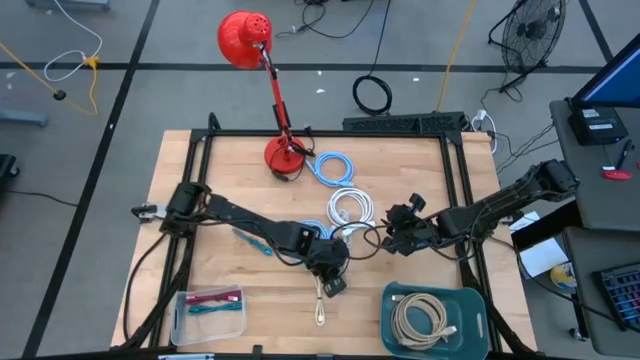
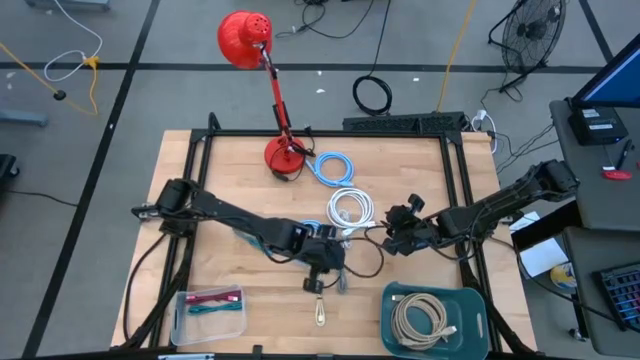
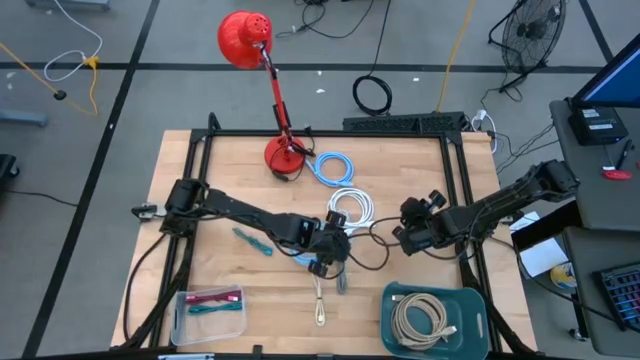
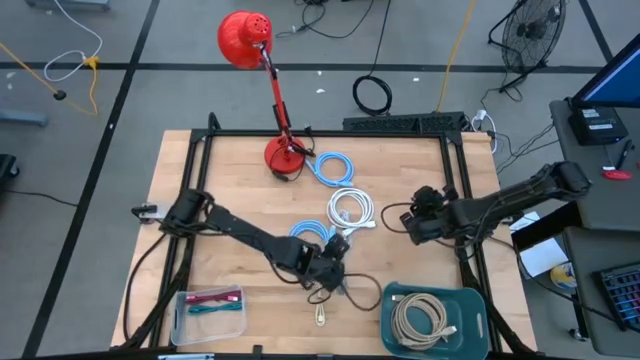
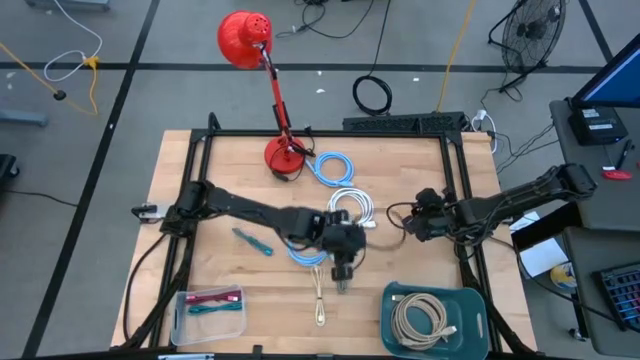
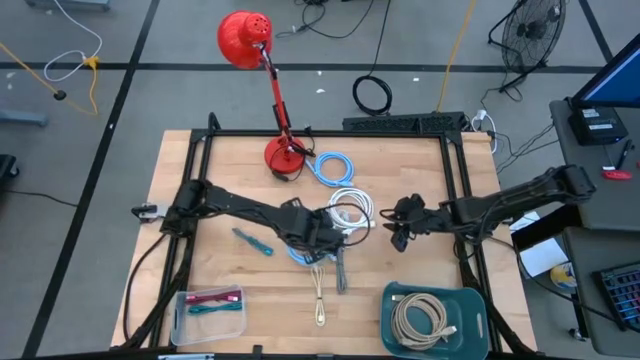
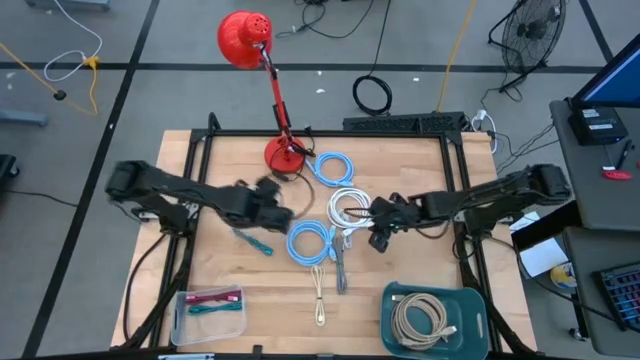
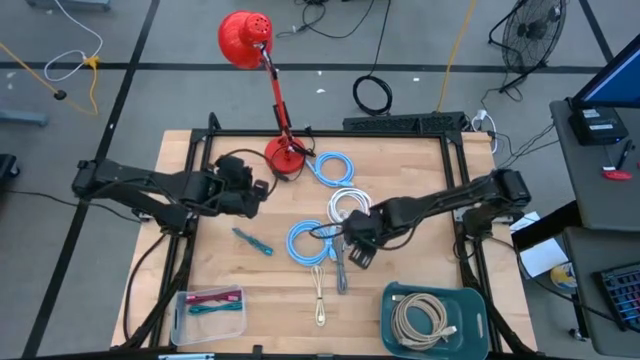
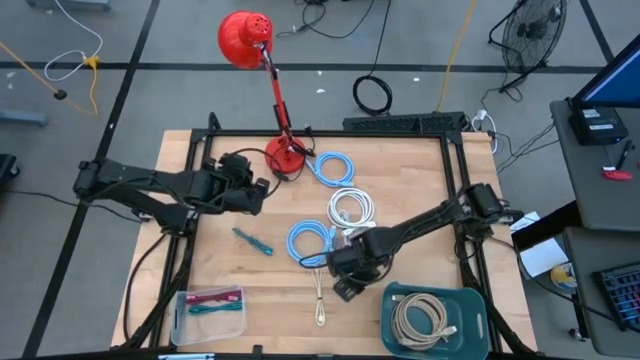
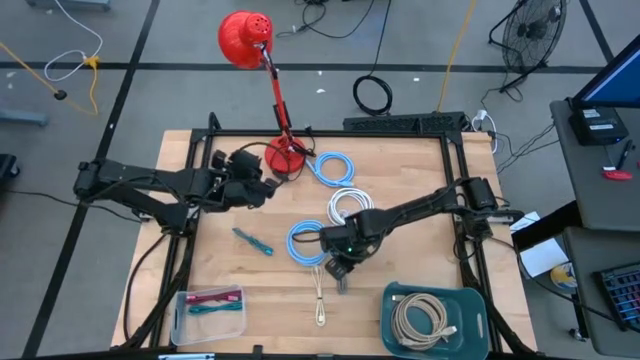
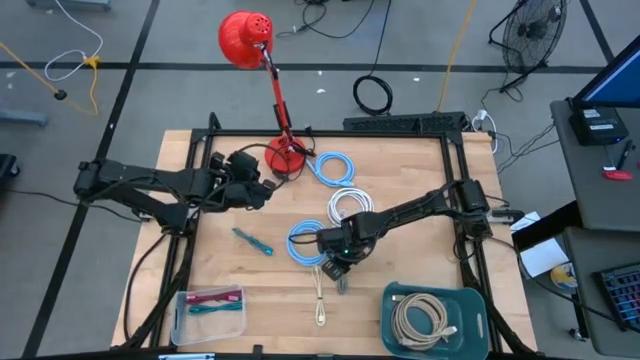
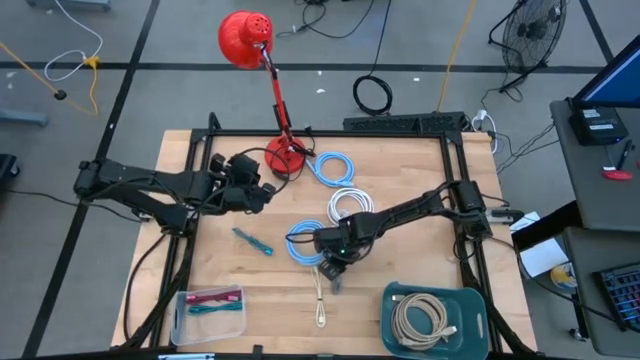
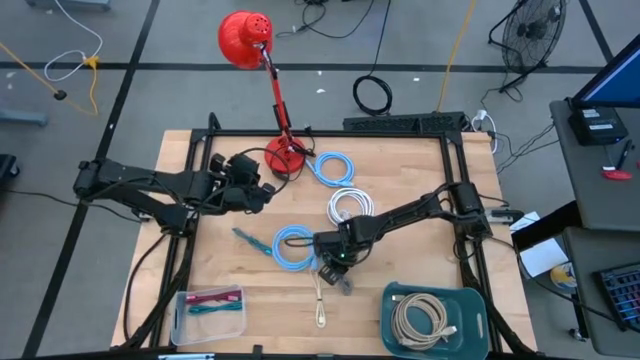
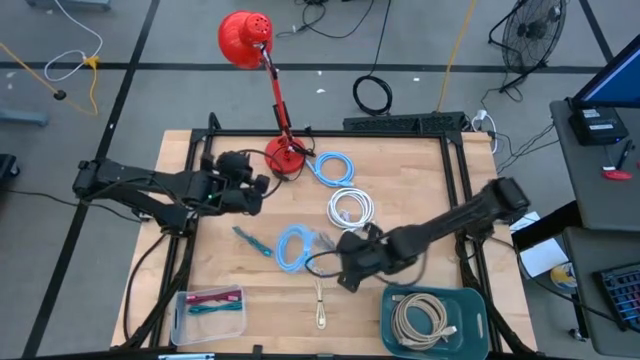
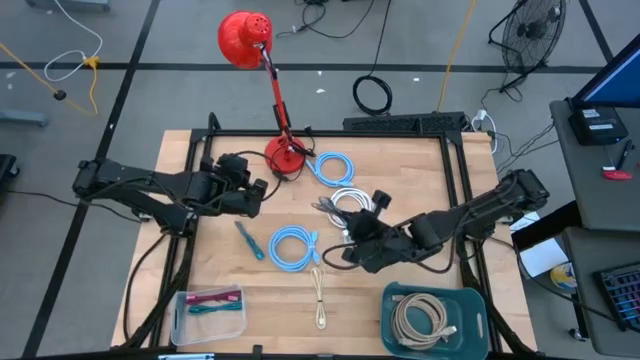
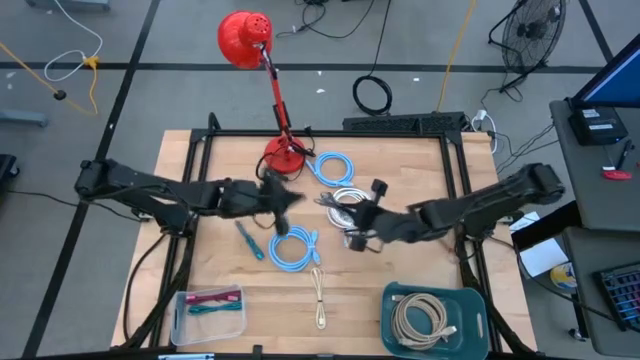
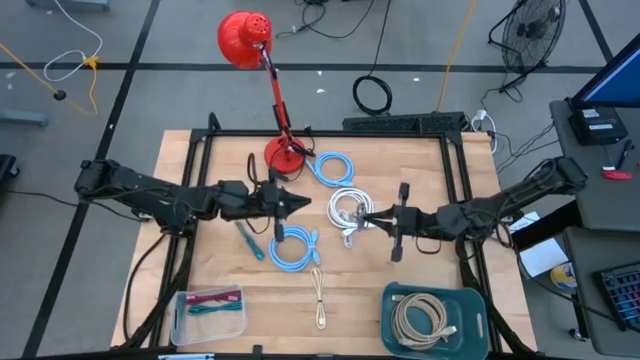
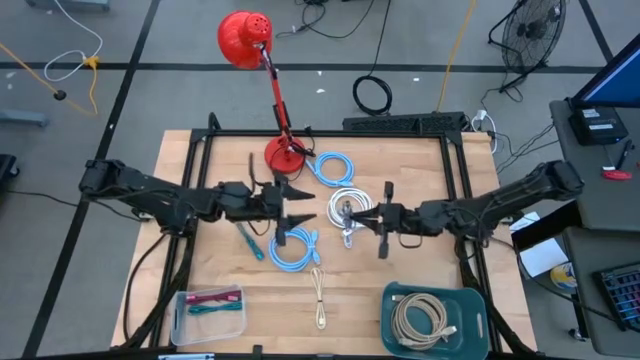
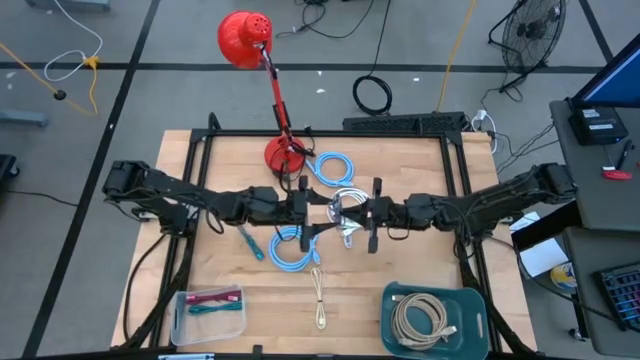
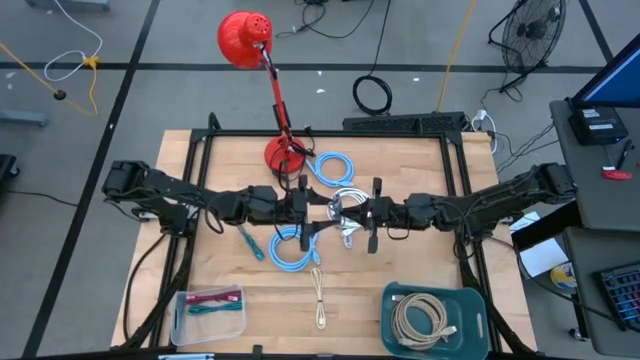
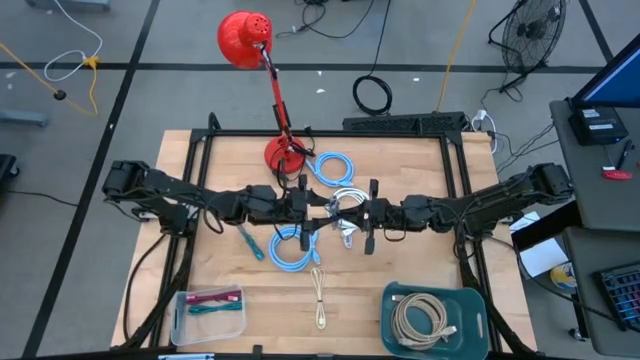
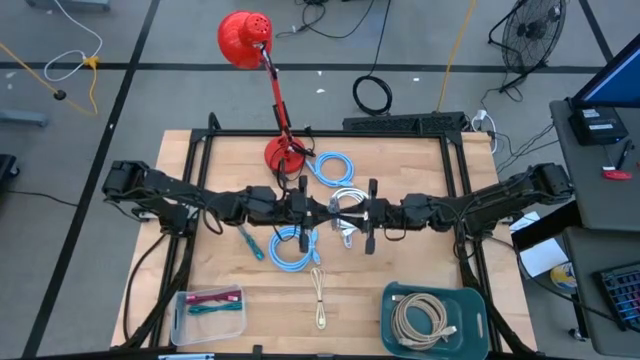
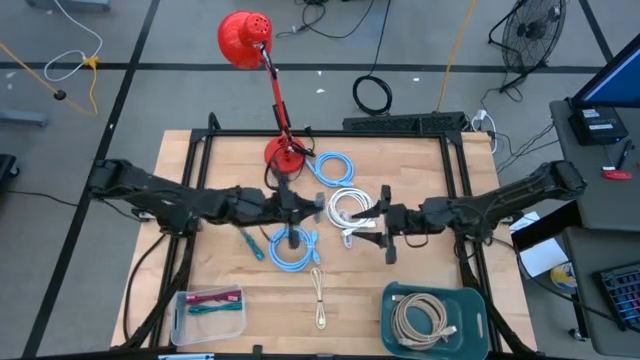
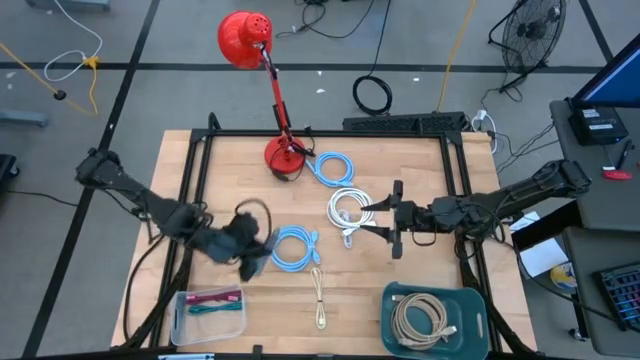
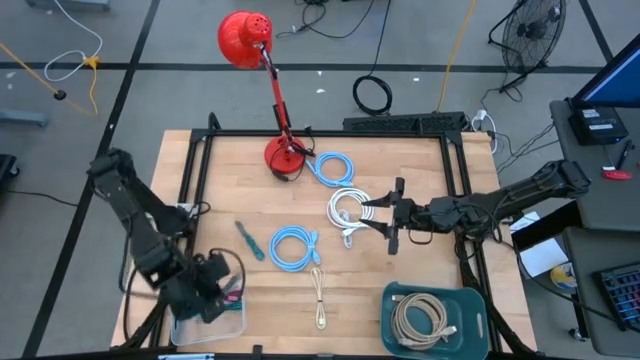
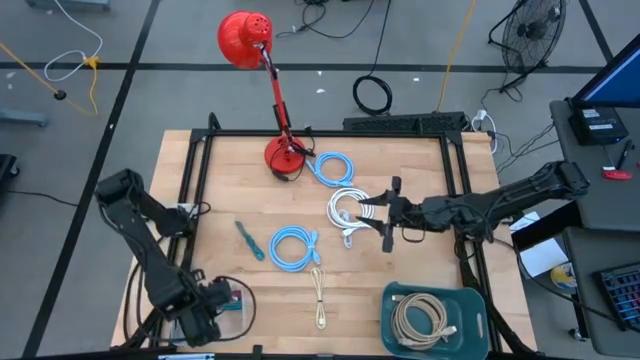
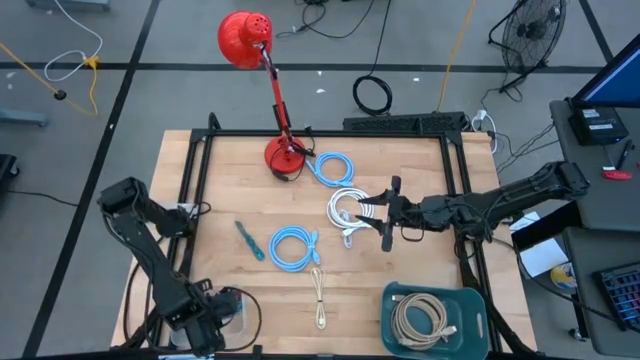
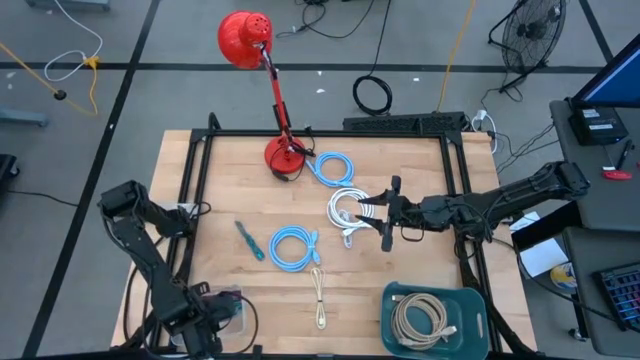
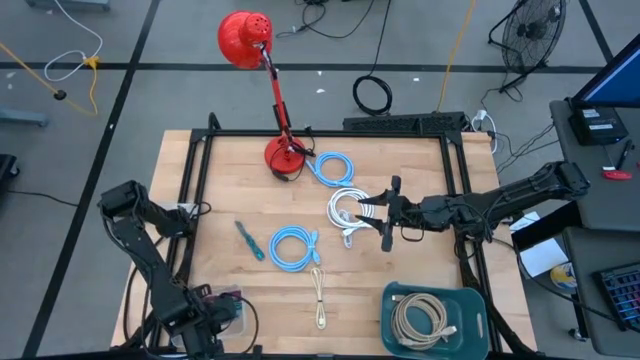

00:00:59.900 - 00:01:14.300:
Task: Pick & Place USB Port
Put the black white charger cable into the transparent bin

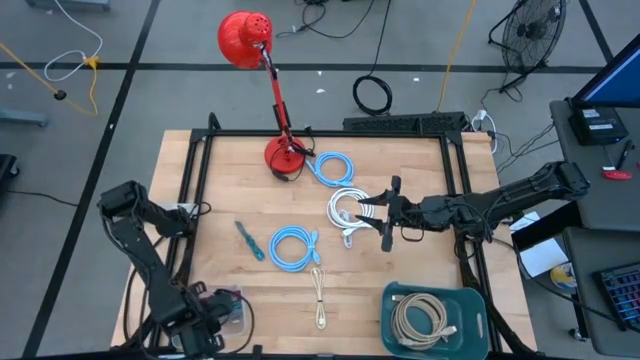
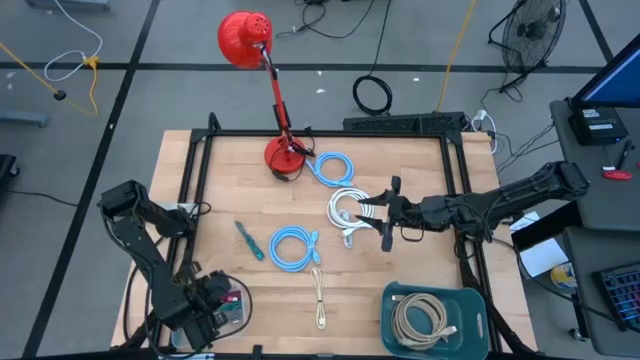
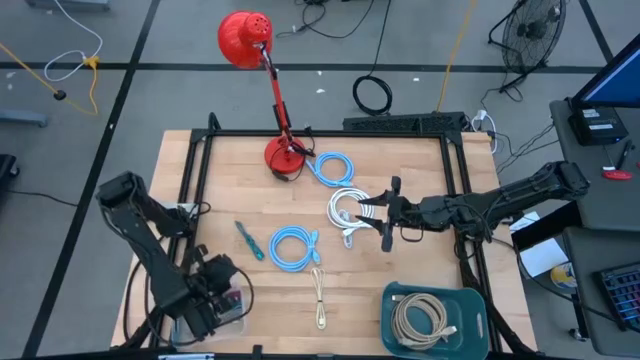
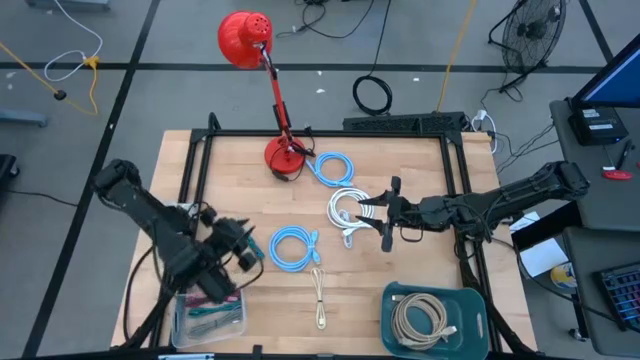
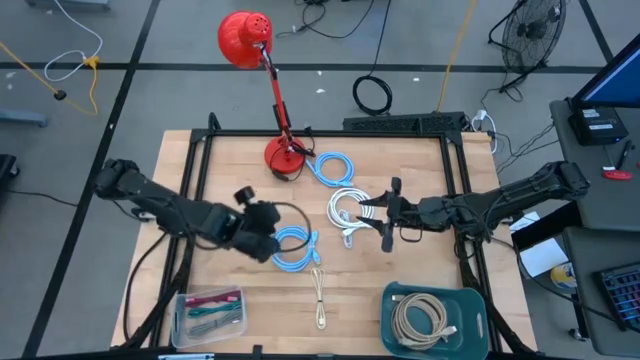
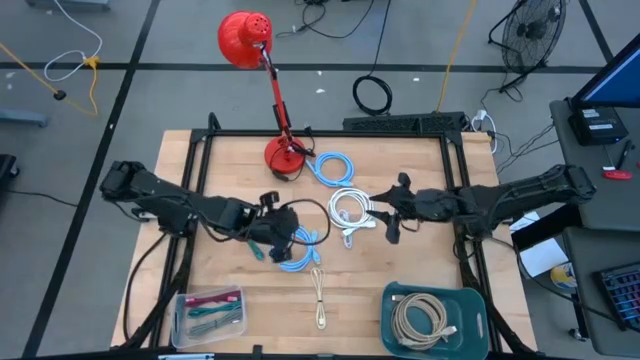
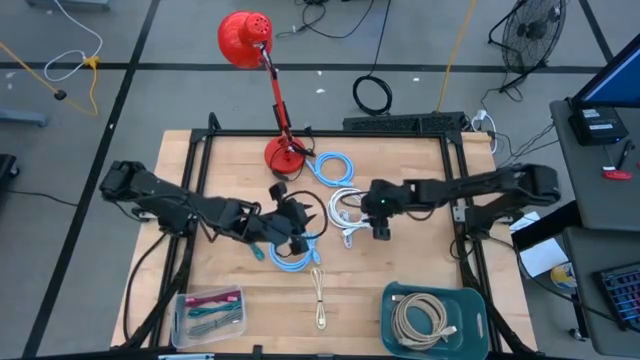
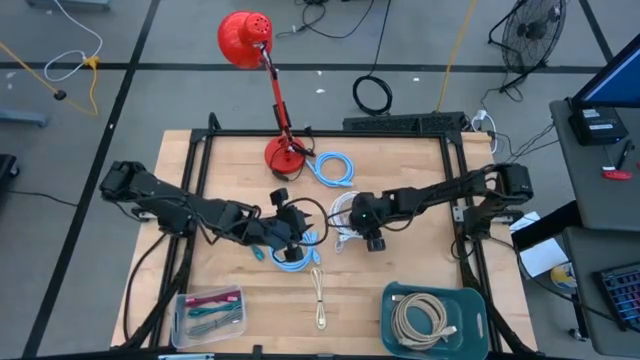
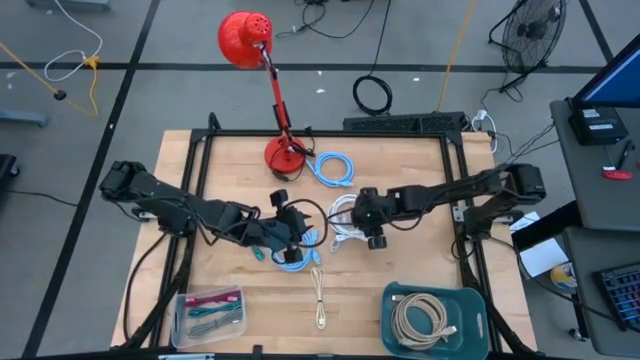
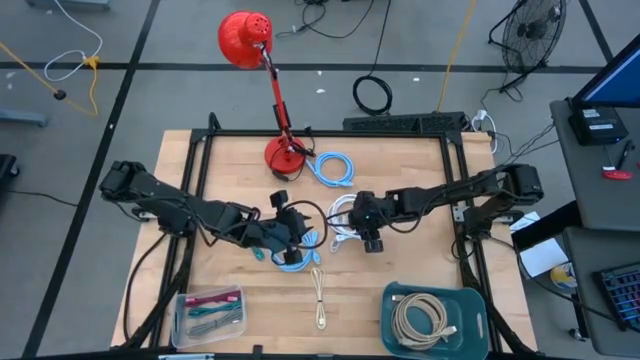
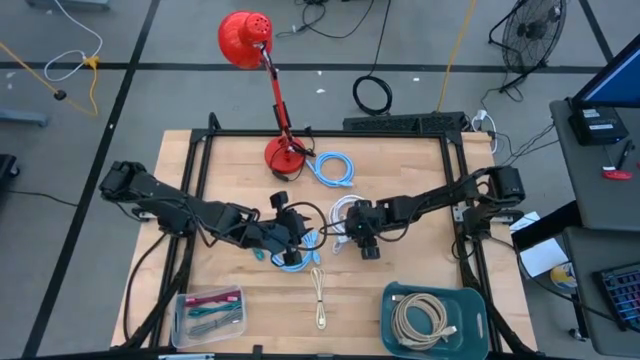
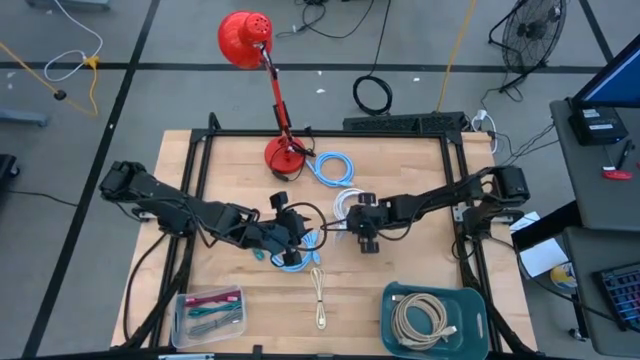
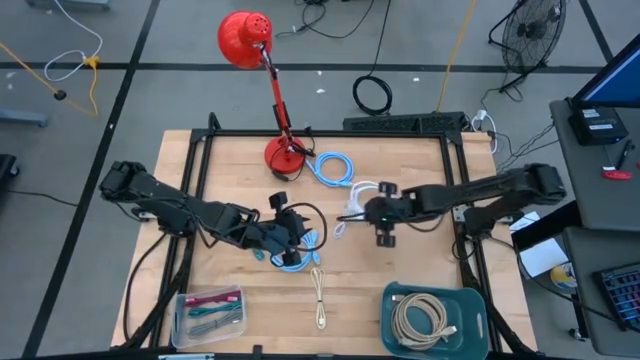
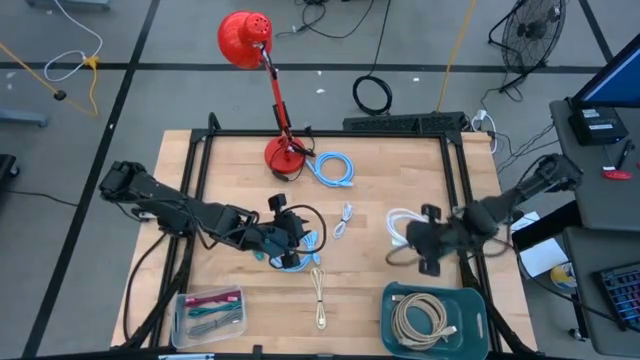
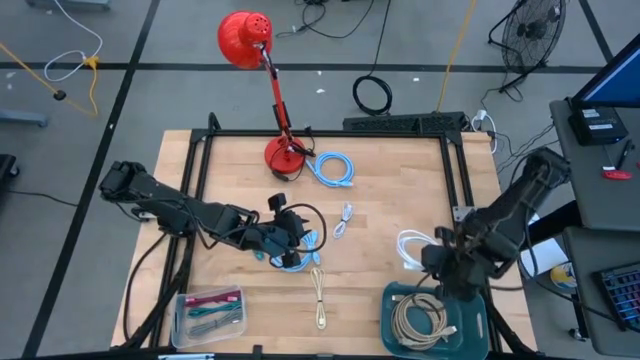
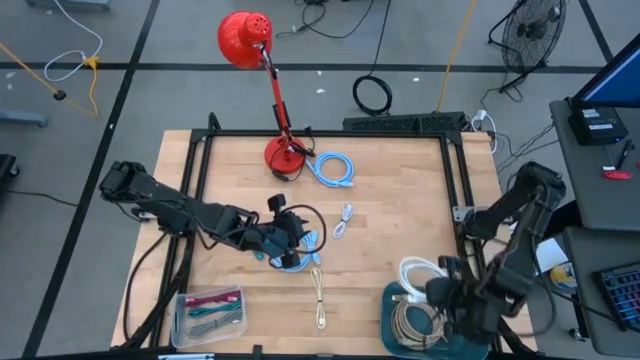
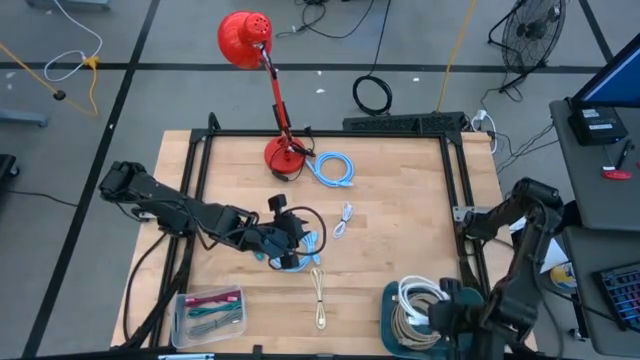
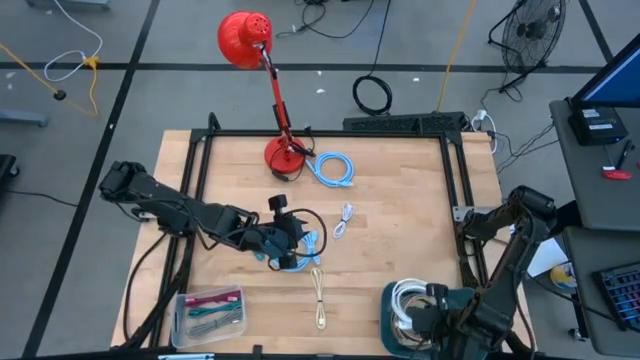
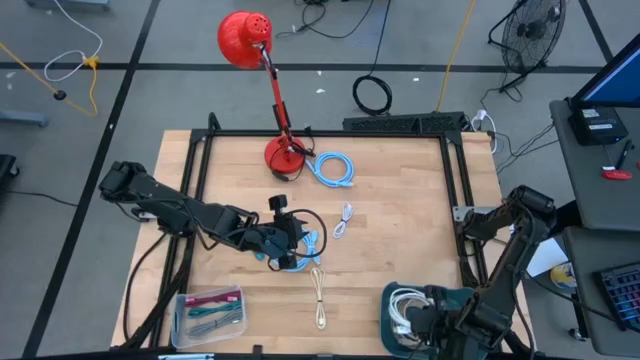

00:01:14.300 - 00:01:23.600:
Put the white charger cable into the blue bin
